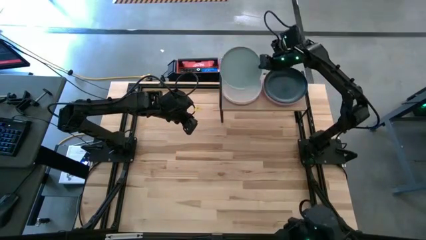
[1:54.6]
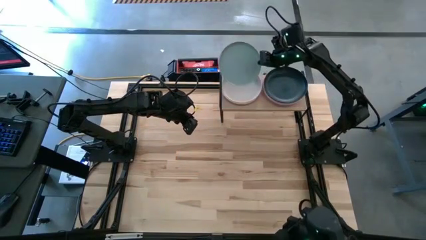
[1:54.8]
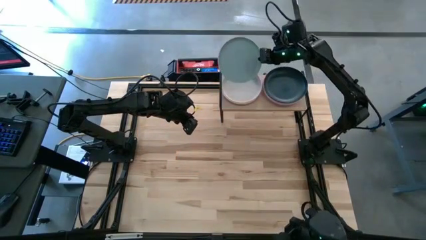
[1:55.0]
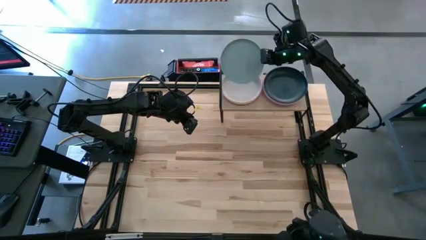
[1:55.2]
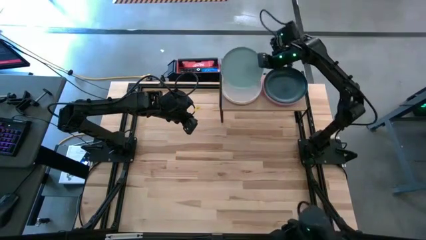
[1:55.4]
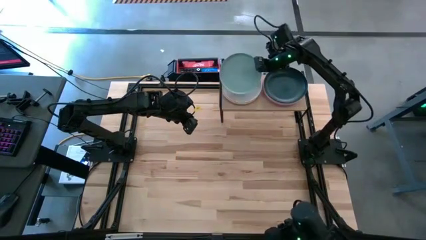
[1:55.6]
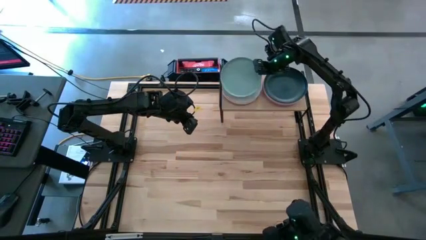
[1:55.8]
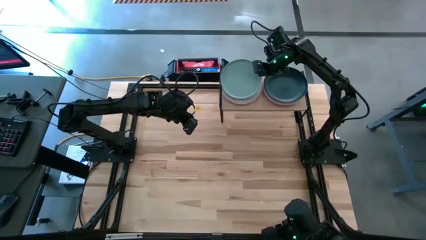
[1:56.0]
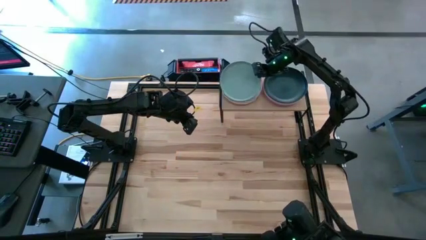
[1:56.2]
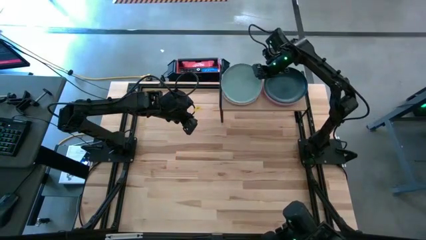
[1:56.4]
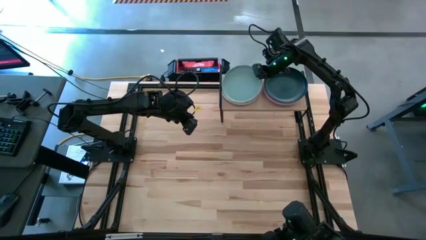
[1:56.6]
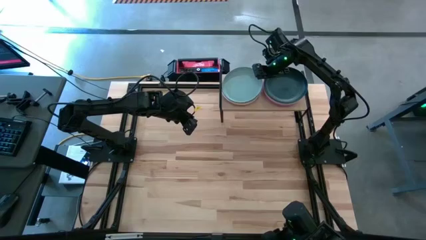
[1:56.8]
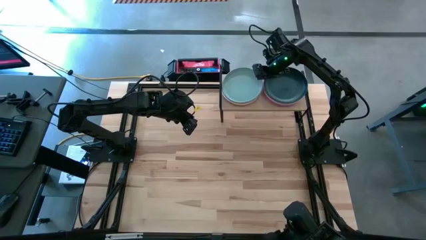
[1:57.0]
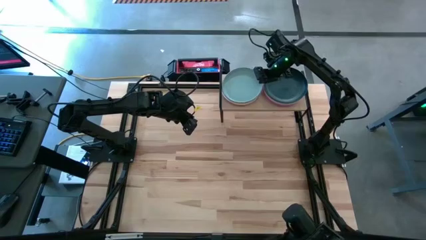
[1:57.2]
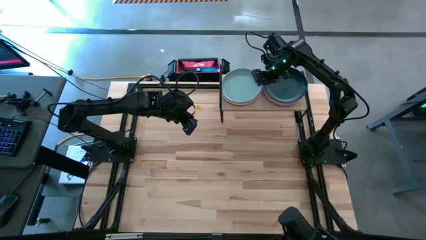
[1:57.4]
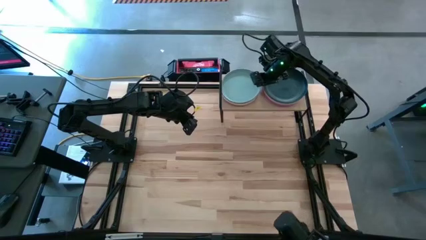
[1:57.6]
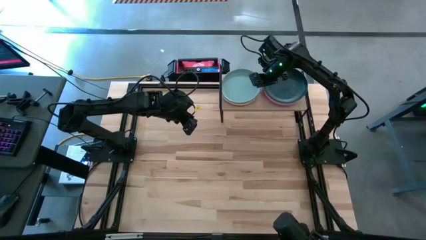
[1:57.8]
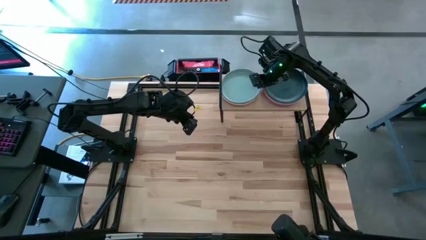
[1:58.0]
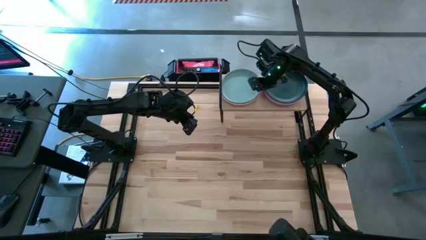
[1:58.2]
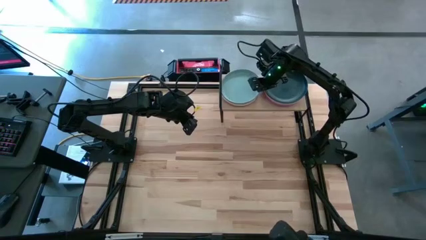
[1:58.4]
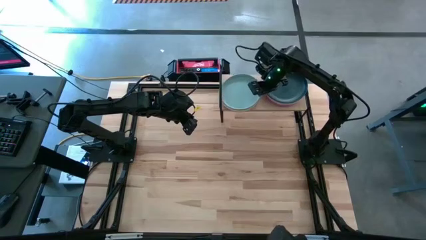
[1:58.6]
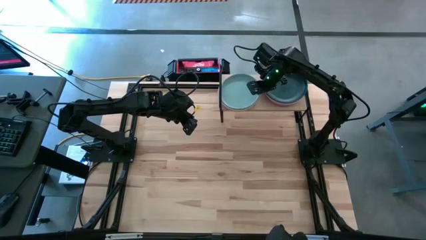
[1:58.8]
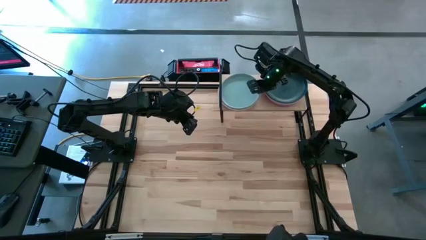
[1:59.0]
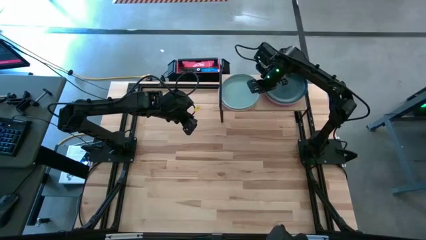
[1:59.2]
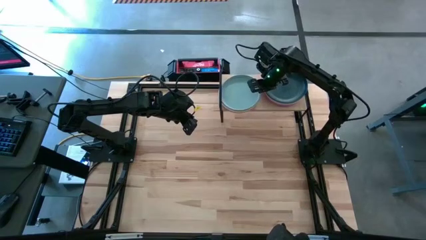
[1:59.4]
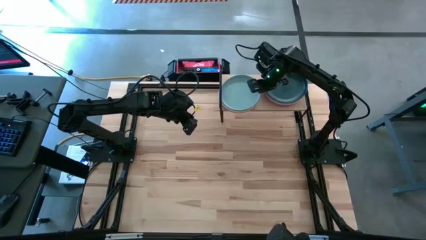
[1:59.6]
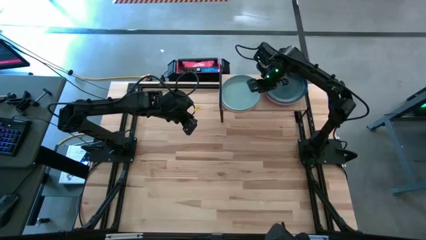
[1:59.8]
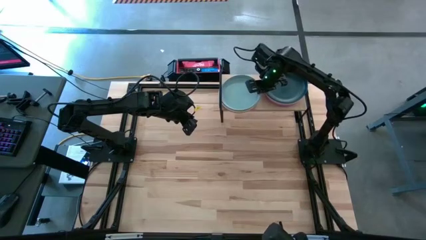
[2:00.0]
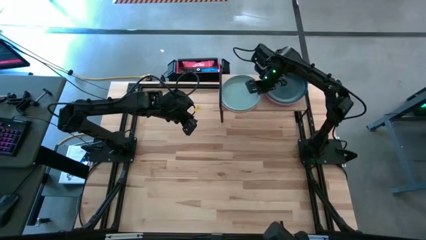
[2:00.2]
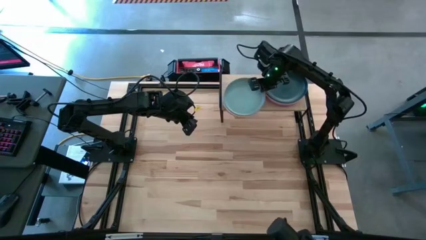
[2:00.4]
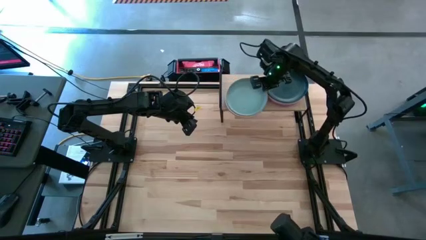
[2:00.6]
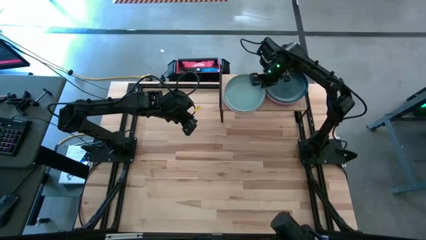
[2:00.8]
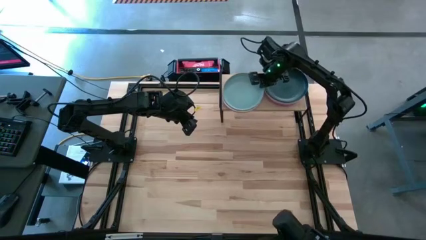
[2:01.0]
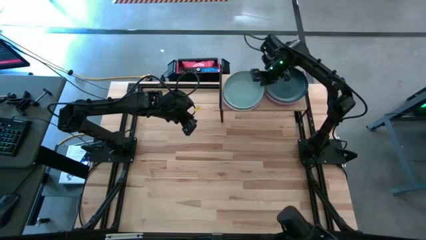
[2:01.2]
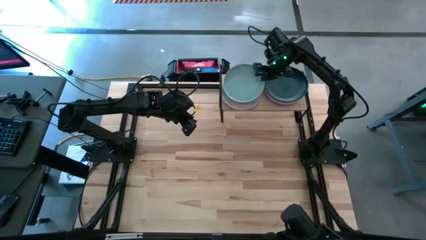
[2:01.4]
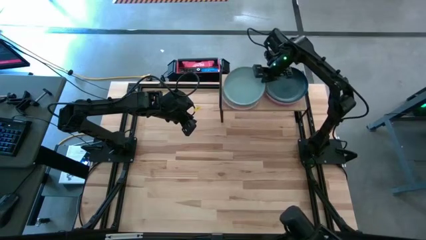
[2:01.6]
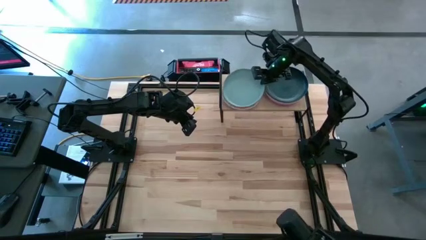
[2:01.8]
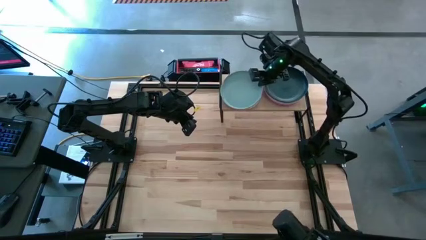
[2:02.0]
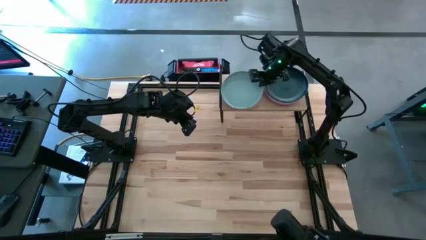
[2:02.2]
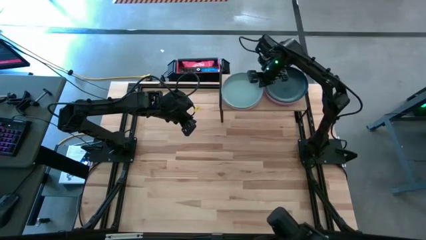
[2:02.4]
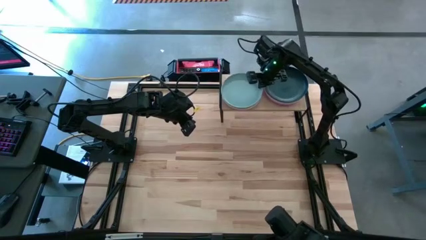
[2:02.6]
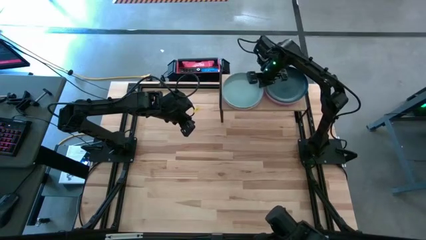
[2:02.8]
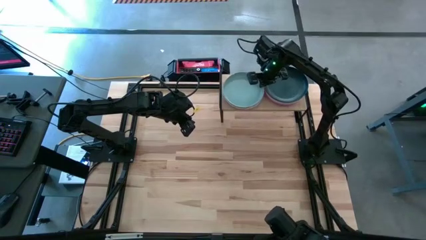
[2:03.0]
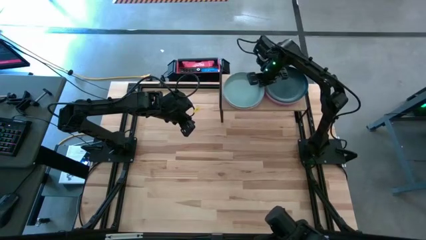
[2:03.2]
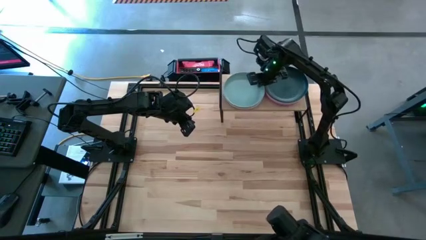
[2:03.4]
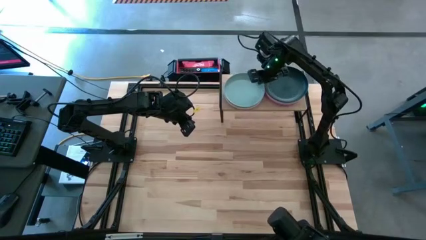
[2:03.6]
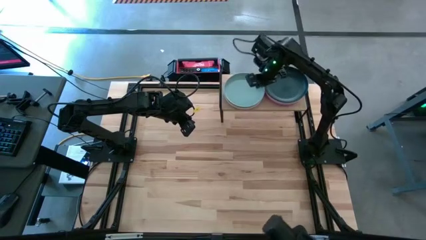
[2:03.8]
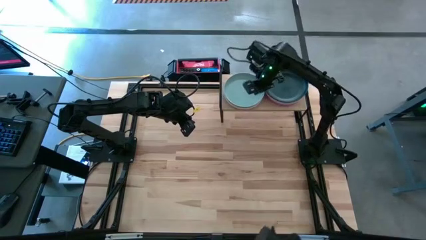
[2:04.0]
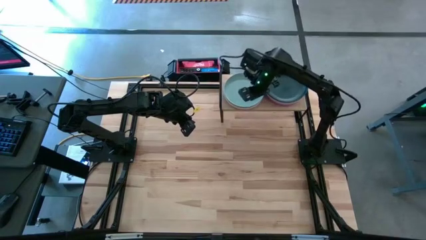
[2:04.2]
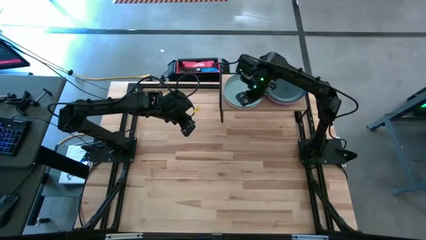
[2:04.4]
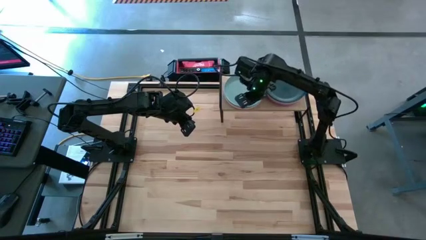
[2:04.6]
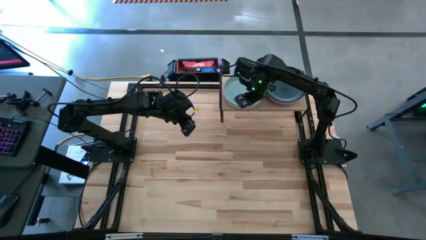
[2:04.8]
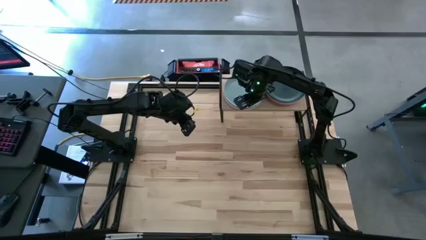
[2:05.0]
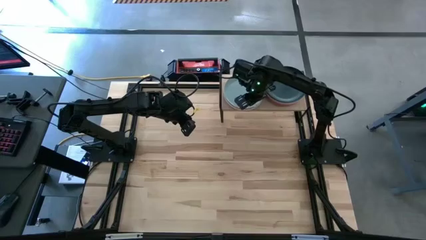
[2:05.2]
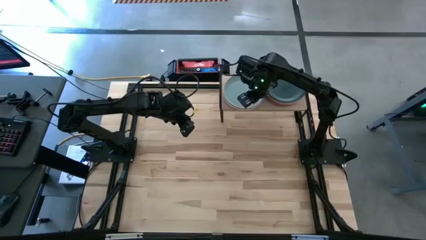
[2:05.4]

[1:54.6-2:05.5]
Task: Place and stack plates onto a shelf
Stack the light blue plate on top of the gray plate on the shelf

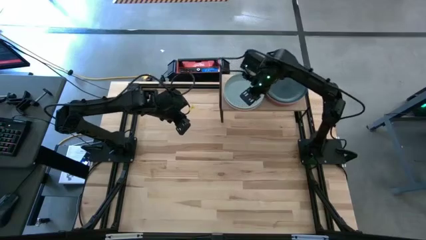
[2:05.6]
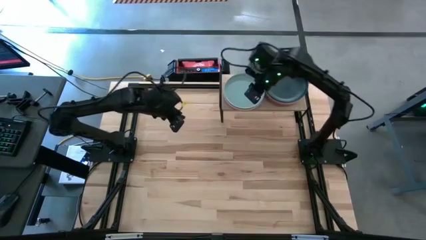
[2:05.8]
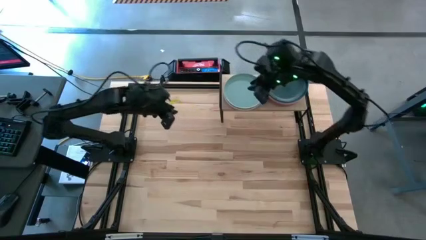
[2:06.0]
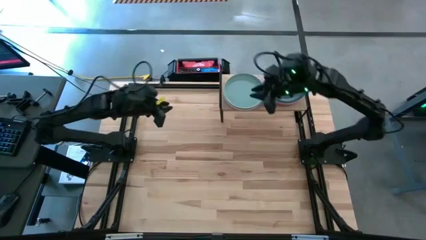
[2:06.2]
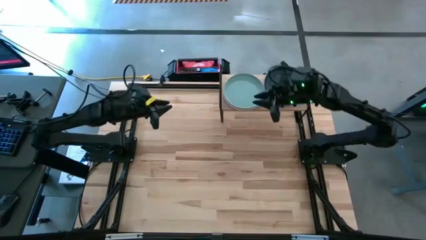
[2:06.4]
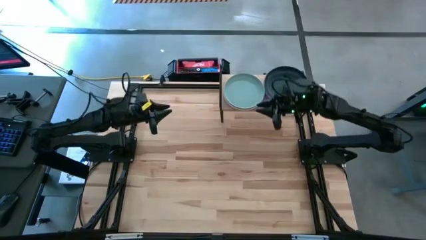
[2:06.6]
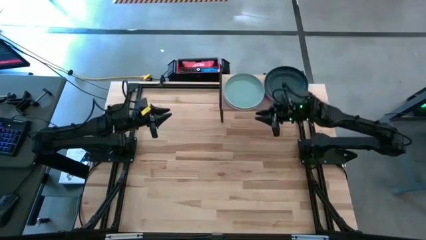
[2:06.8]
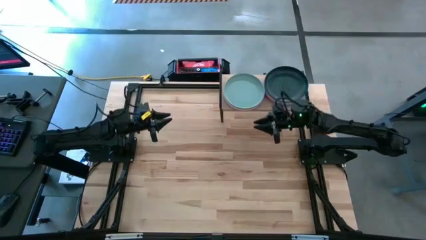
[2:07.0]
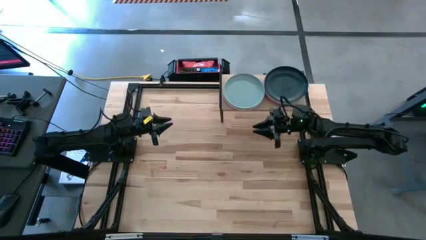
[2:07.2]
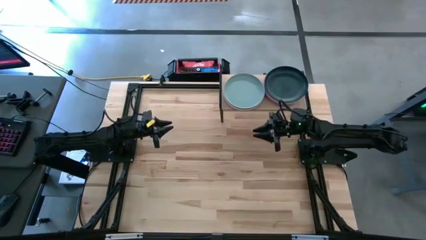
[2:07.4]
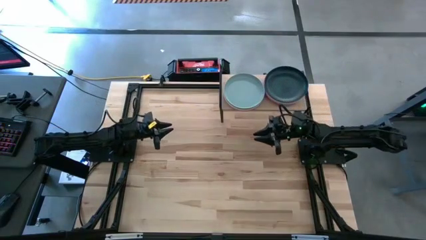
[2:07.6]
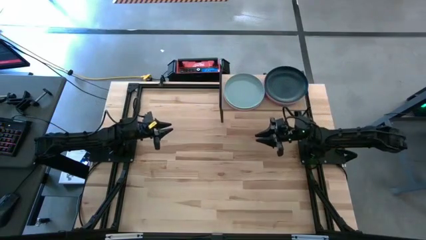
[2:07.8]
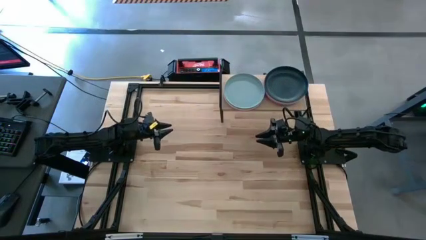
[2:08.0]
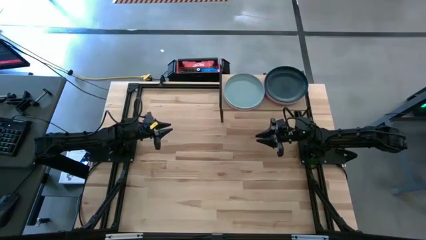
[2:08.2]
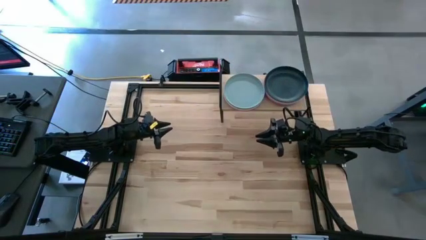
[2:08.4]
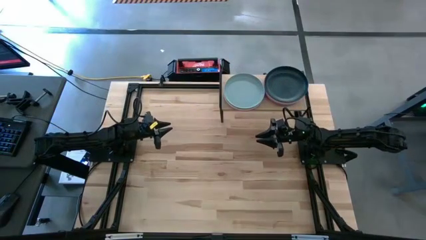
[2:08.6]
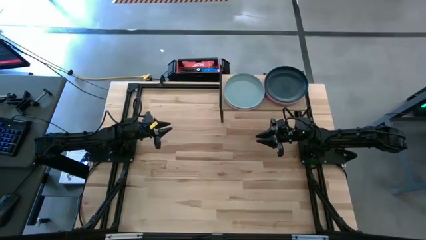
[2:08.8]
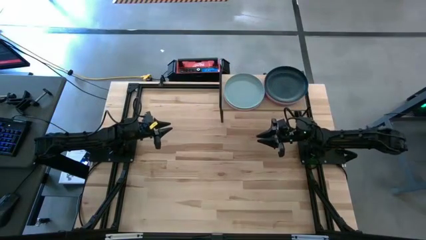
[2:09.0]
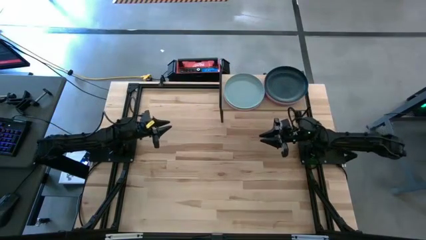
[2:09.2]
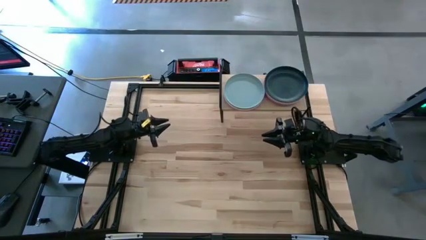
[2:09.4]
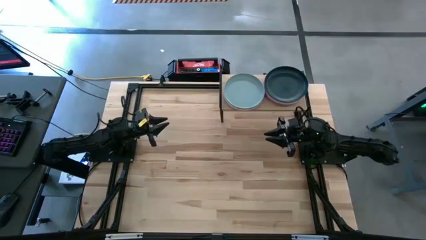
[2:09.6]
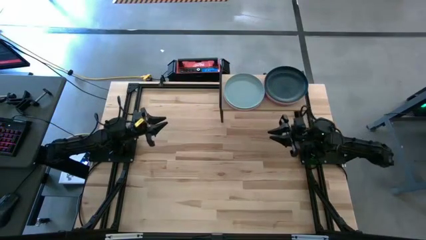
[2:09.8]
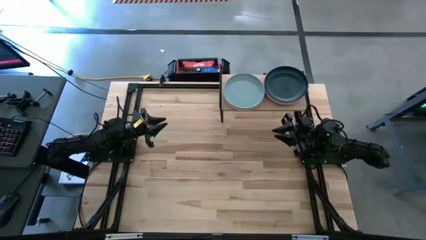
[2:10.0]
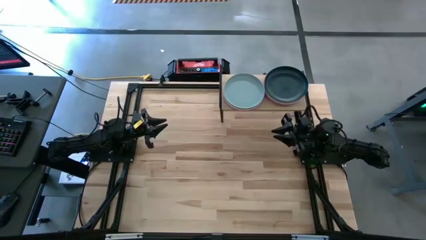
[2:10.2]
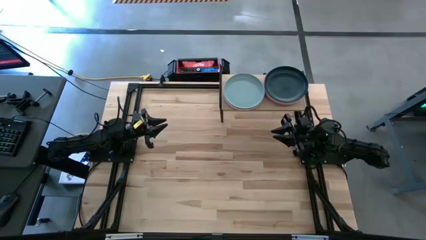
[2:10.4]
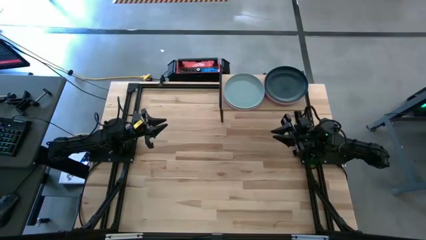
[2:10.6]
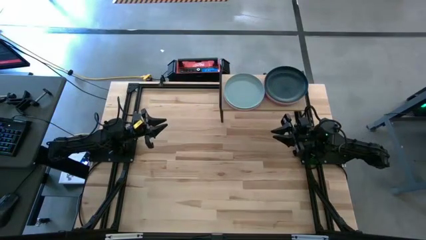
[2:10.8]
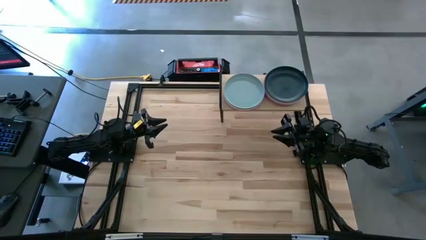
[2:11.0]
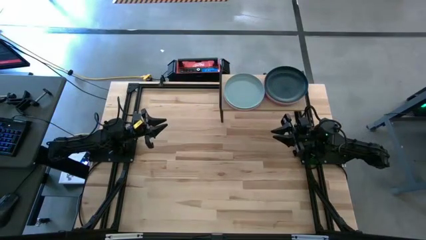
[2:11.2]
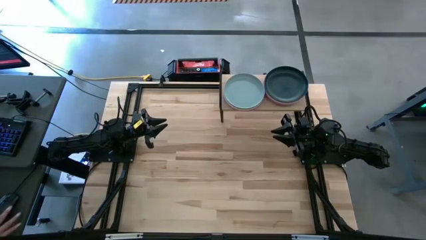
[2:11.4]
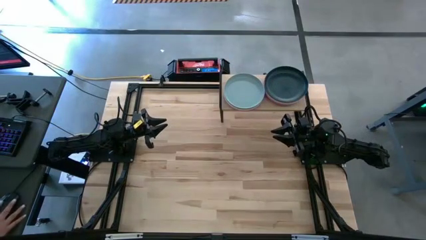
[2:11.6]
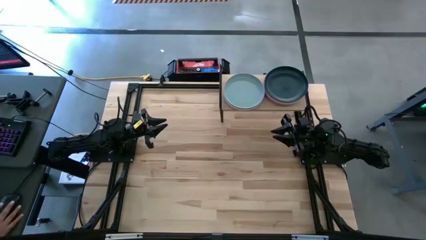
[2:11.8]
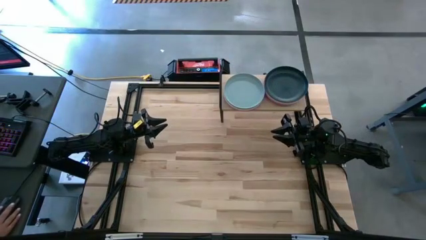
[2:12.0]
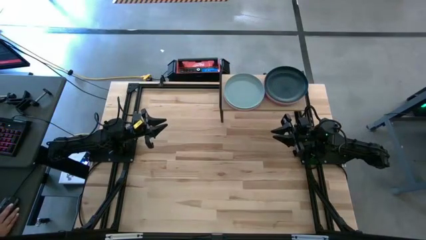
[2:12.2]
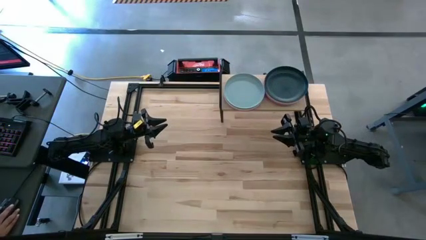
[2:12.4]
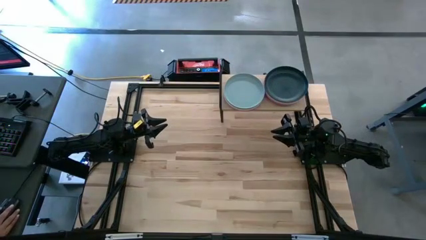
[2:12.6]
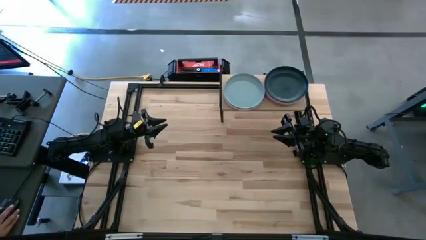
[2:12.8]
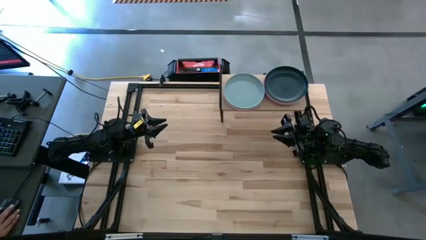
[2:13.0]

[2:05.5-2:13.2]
Return to Home Position
